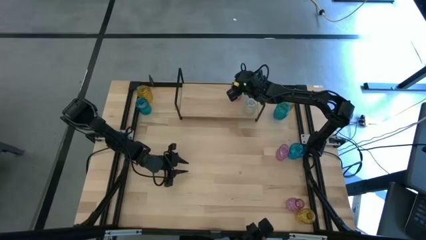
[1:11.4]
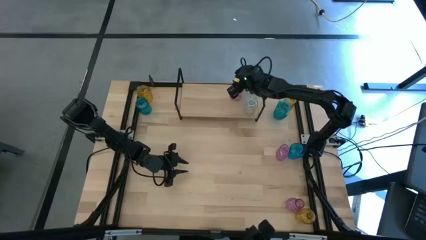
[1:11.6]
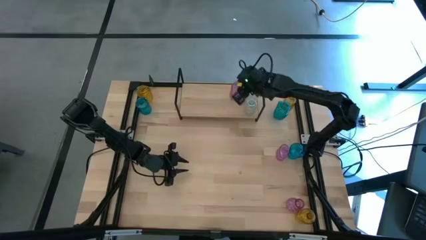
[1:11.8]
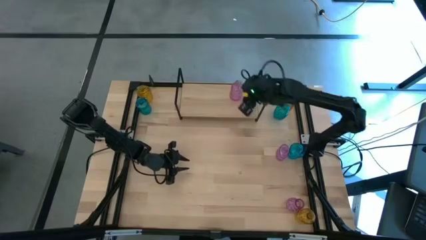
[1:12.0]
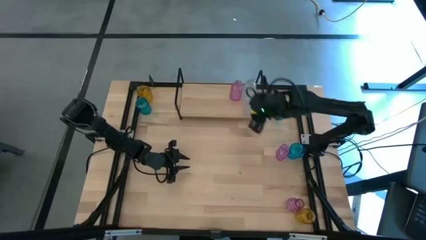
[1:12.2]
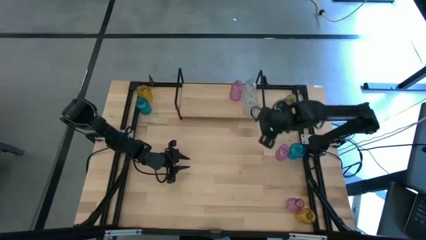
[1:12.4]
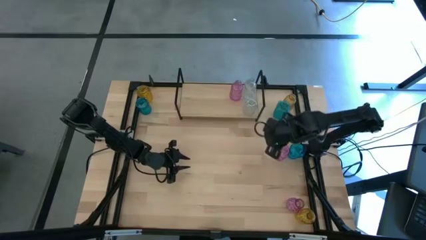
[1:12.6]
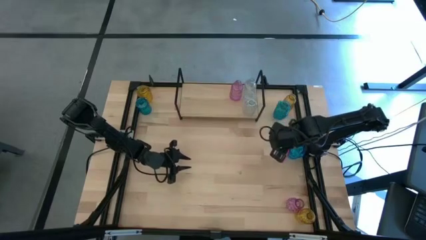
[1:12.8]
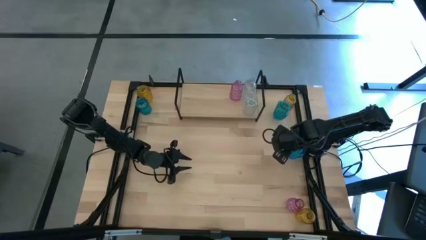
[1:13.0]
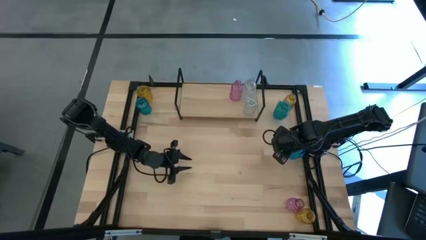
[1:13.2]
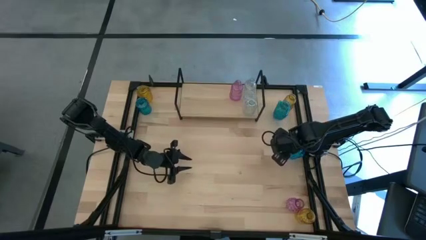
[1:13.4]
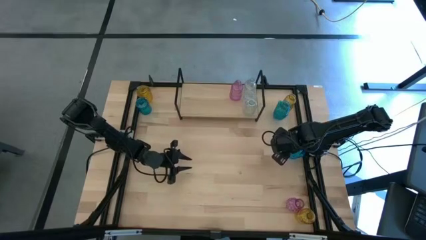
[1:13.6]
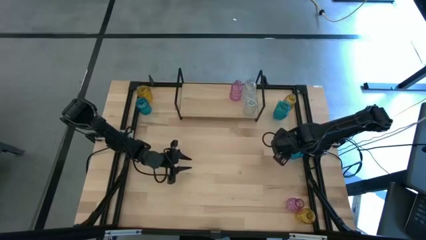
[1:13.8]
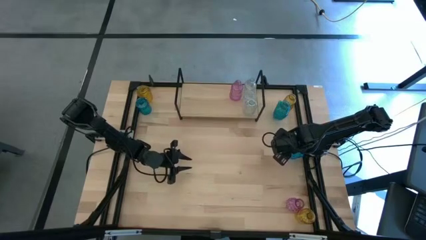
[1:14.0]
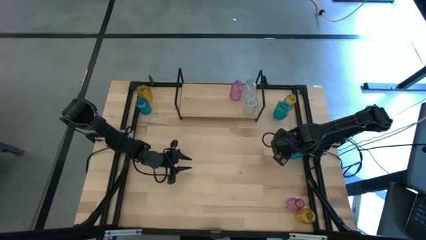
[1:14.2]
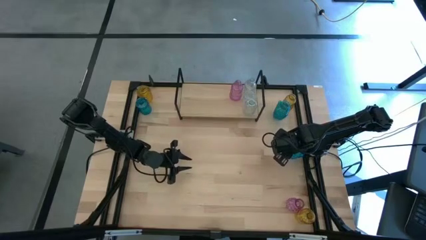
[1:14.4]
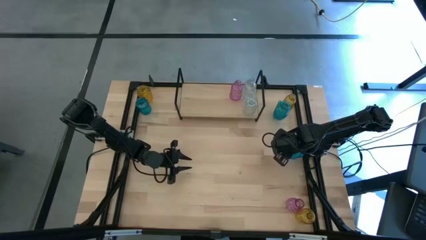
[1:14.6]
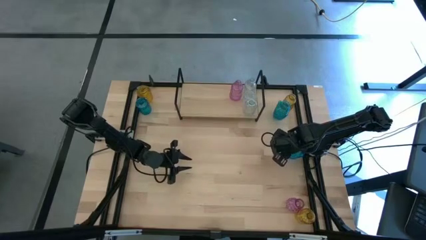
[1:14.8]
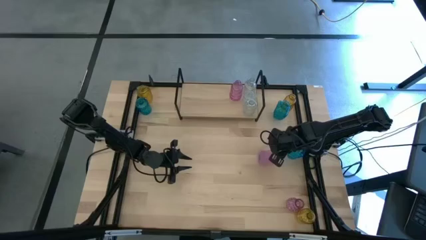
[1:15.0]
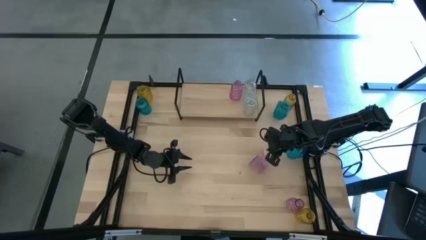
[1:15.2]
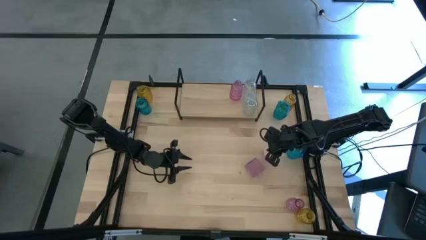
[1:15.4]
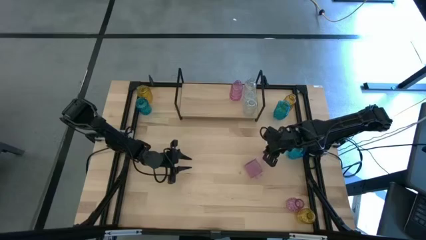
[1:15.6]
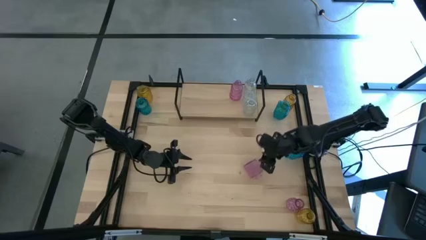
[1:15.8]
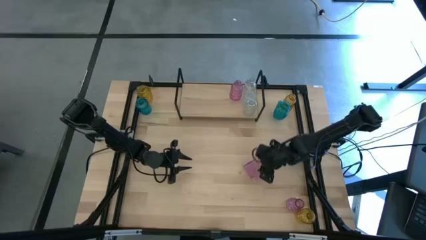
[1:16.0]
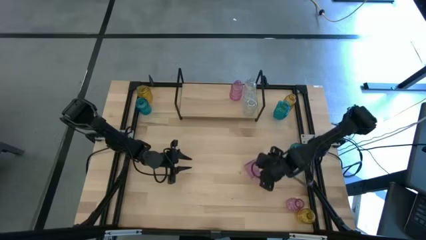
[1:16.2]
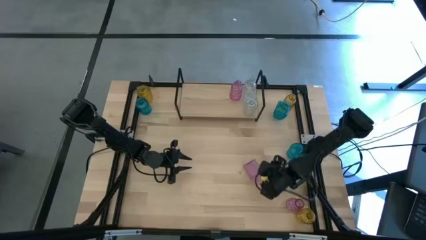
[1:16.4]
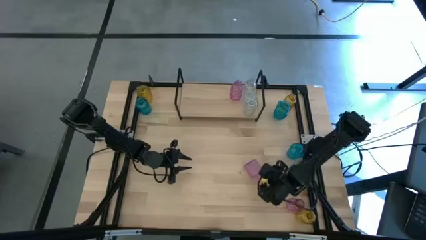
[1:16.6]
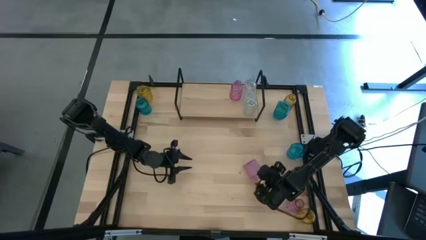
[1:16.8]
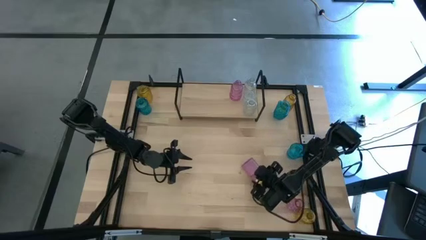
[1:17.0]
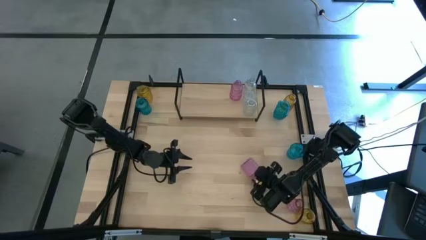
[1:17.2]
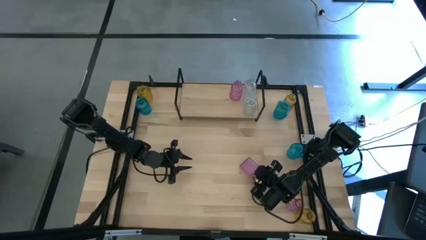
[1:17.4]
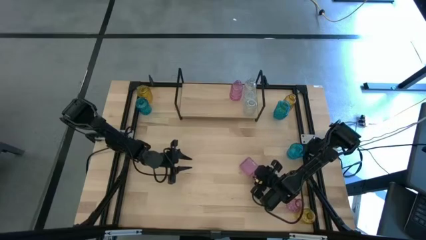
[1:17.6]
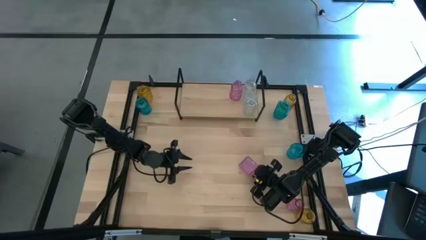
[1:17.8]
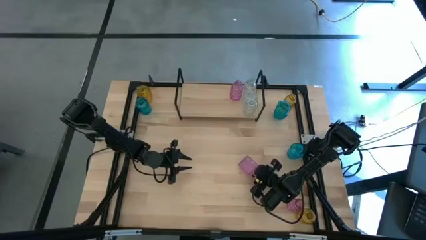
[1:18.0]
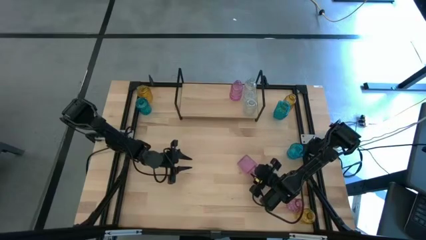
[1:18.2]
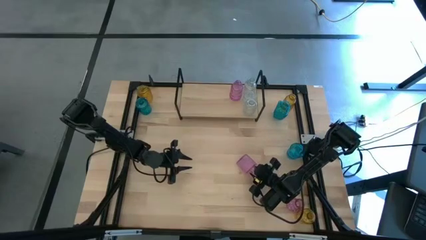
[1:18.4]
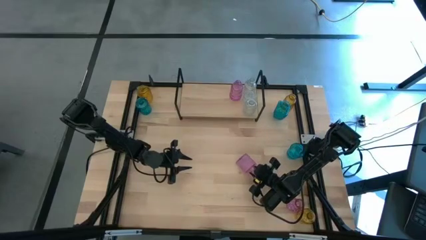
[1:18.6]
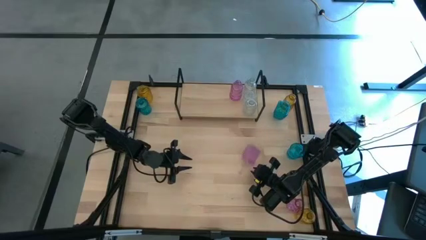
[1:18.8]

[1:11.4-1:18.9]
Task: sort vases onto shelf
Put the top pink vase on the shelf aligned with the other pink vase
